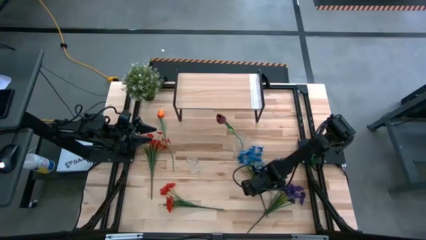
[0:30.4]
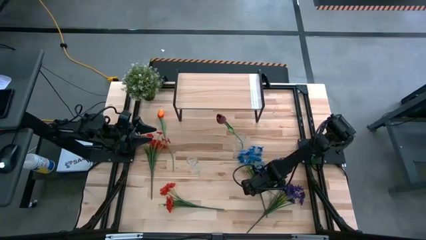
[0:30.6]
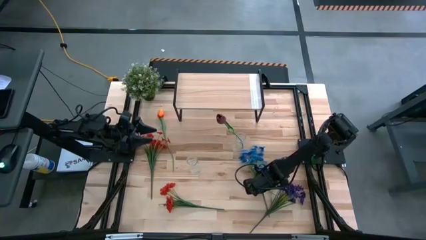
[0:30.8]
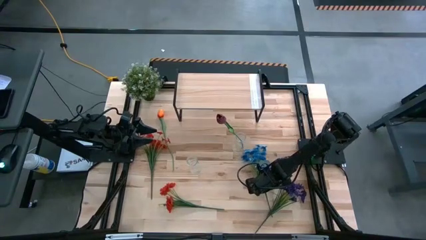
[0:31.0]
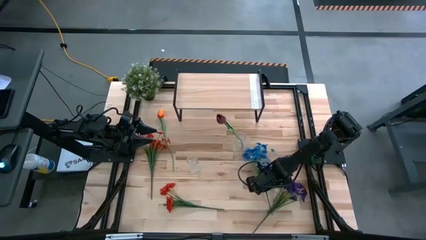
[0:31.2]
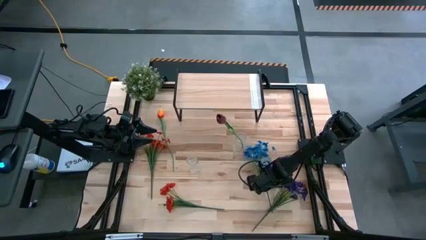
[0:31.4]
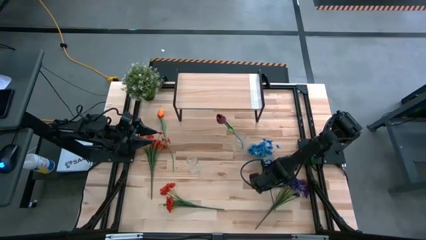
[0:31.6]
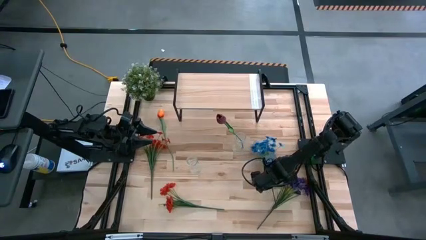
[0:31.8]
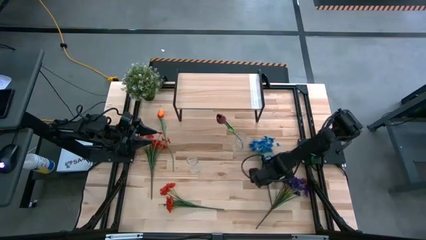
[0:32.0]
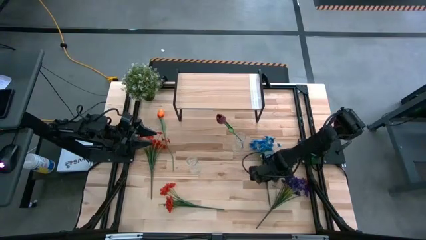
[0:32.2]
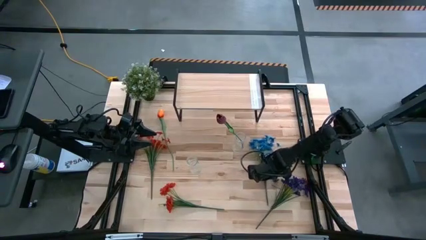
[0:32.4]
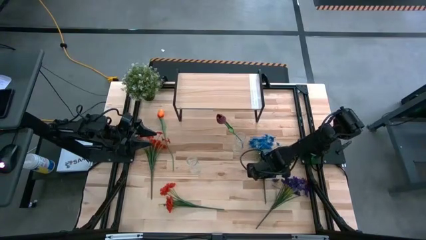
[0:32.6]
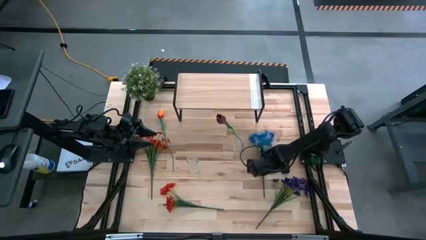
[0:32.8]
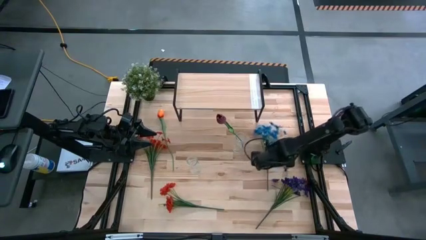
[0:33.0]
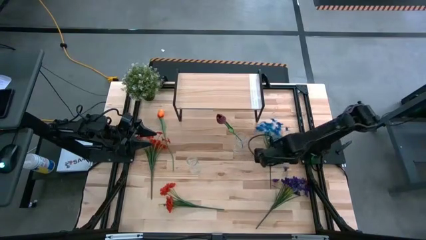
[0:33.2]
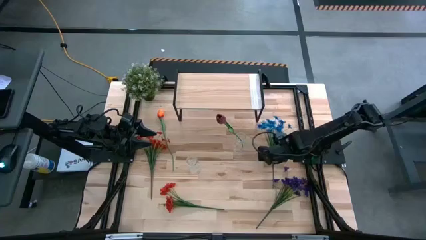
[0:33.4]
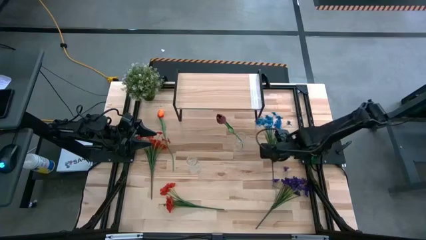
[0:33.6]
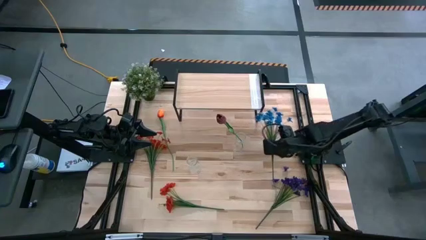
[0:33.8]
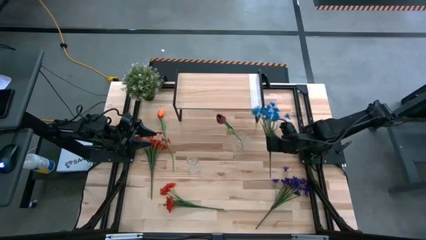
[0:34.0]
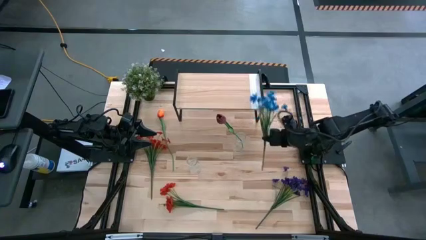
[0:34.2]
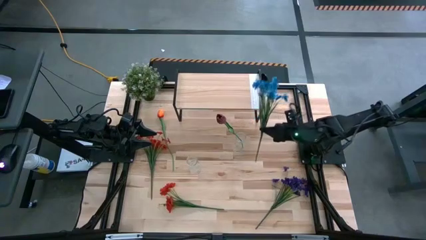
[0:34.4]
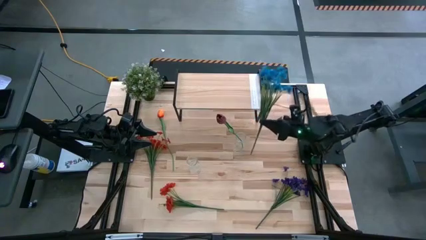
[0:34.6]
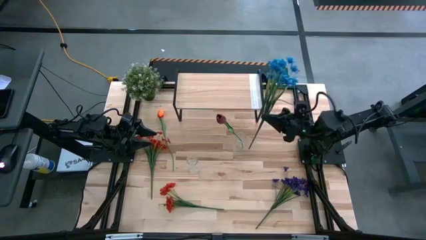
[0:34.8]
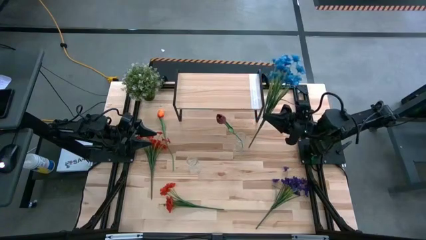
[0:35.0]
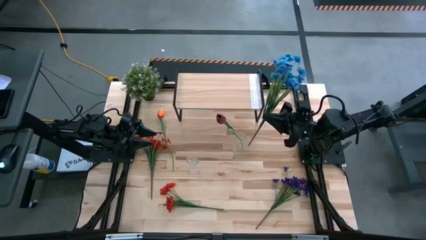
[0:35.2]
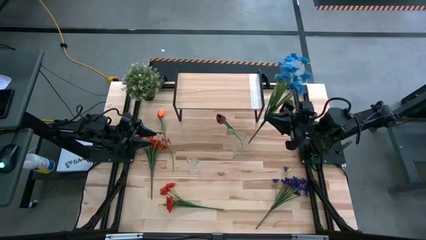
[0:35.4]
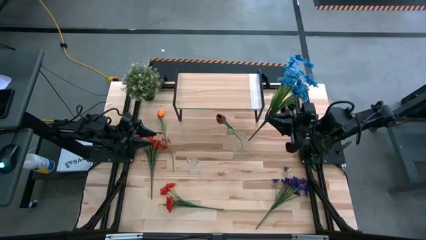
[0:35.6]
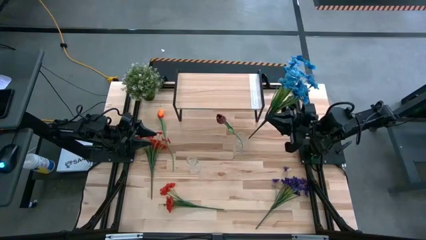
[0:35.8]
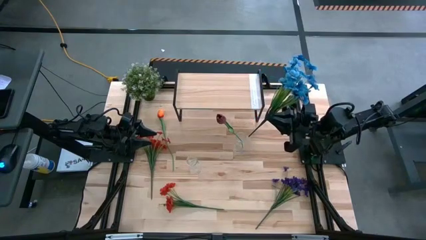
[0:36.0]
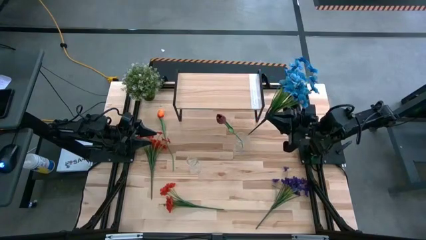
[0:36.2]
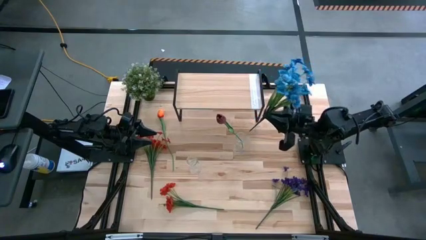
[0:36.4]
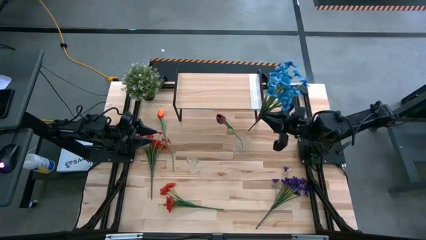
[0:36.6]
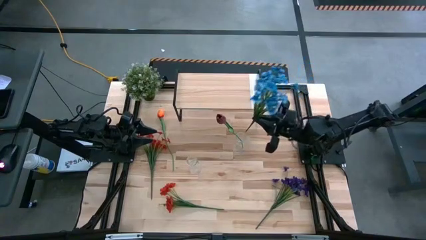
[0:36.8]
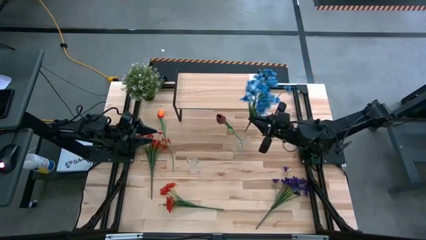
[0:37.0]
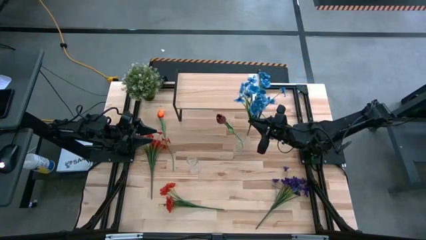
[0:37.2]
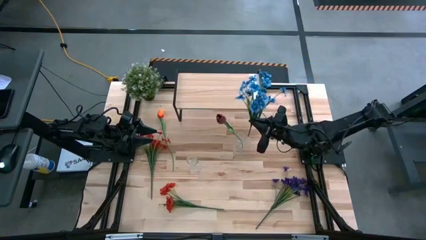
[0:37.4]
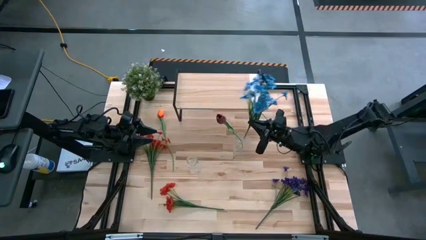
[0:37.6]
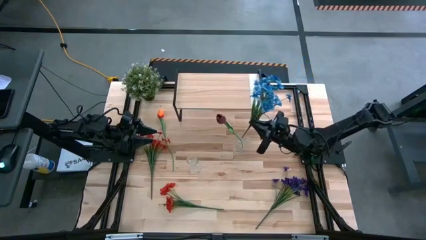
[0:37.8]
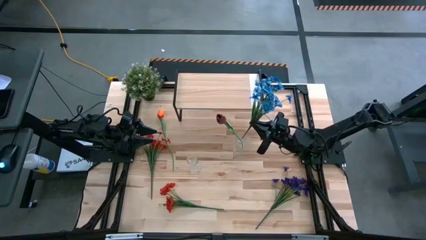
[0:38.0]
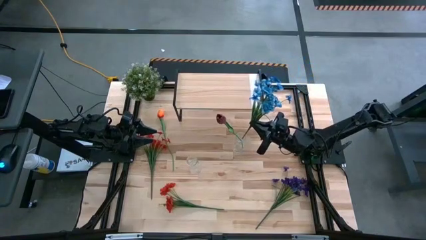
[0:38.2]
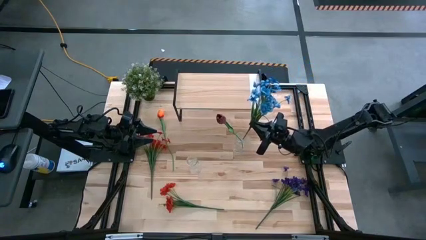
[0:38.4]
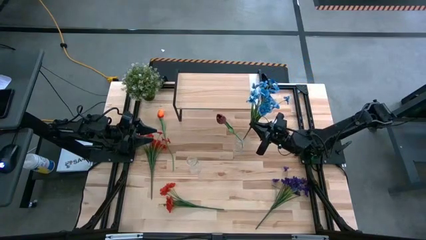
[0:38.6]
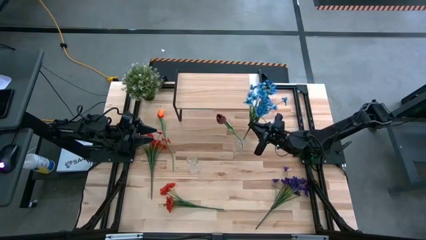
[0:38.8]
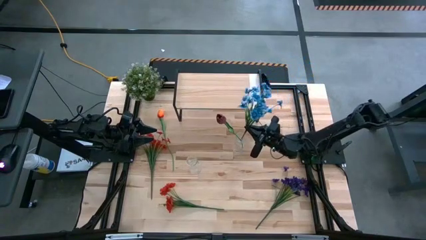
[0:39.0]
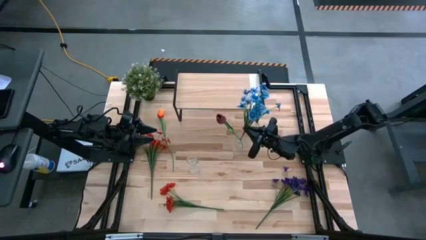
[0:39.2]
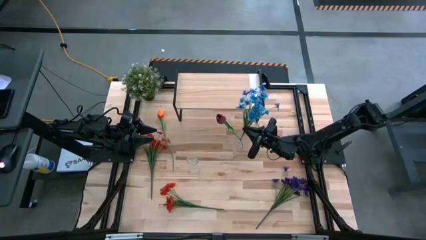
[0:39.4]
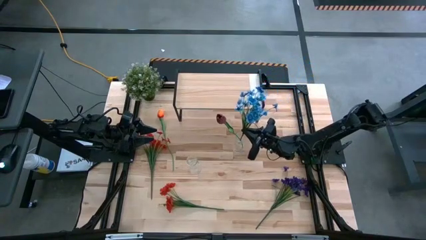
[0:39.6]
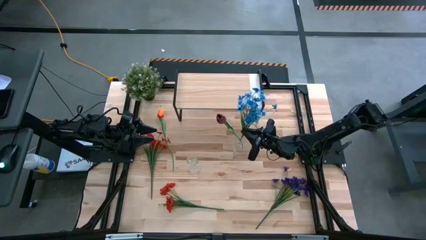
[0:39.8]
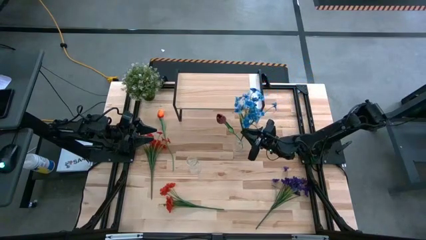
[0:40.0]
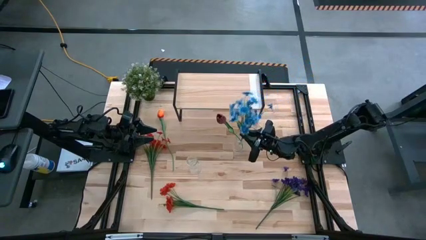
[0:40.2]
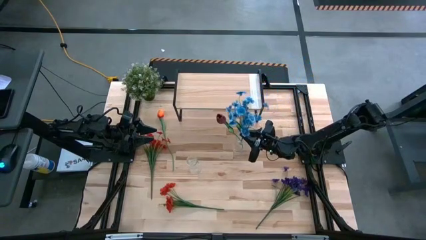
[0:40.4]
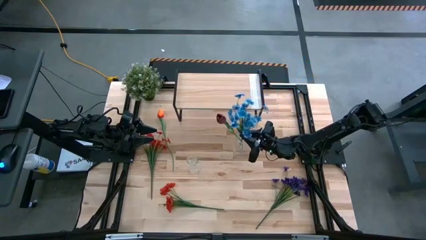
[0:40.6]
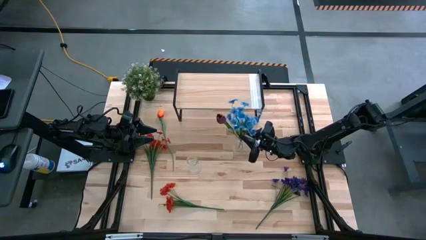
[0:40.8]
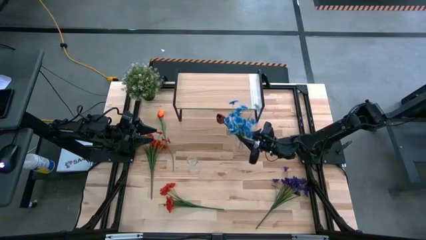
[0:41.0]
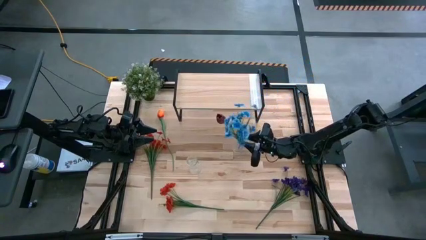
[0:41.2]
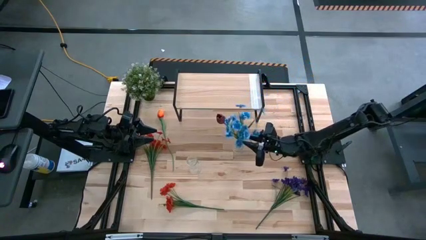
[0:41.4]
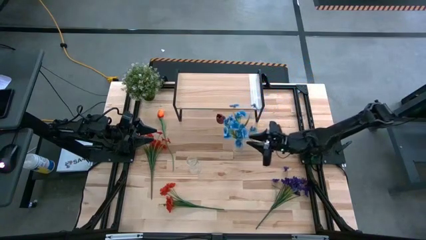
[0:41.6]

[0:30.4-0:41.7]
Task: Pick and place flowers into a vace then onto a shelf
Put the blue flower into the right transparent vase

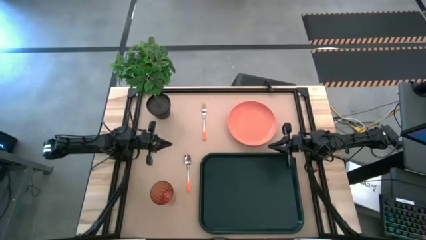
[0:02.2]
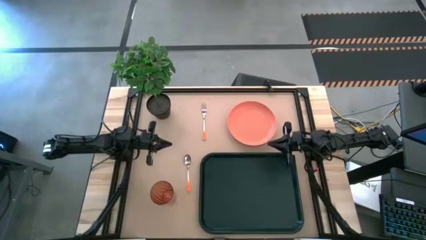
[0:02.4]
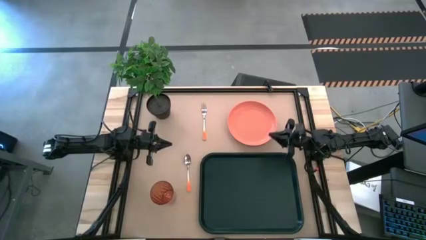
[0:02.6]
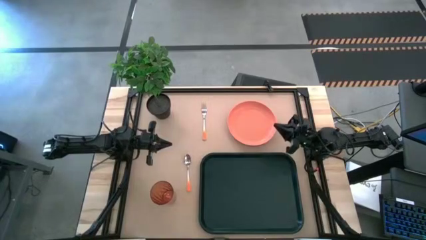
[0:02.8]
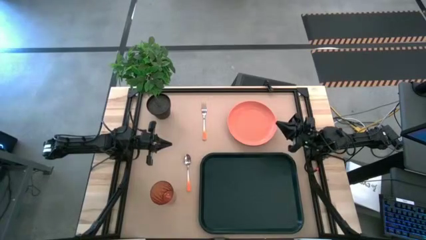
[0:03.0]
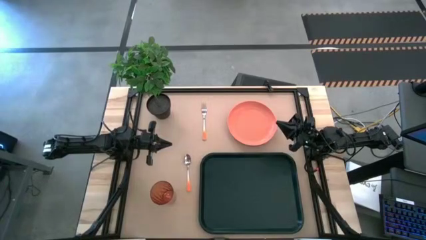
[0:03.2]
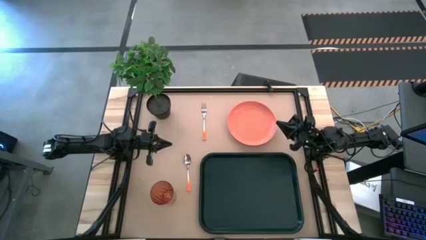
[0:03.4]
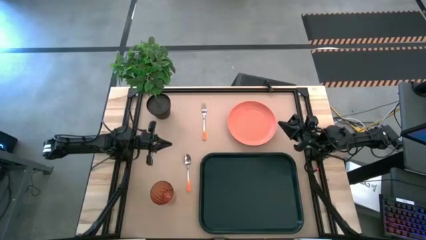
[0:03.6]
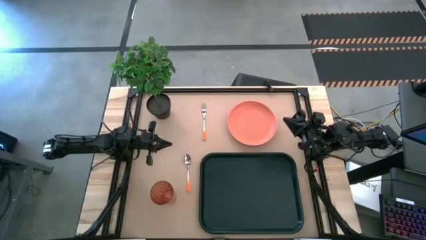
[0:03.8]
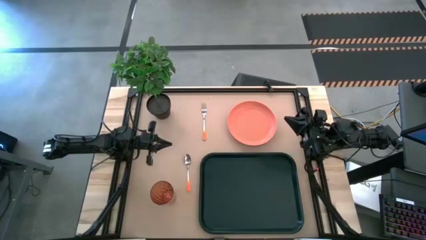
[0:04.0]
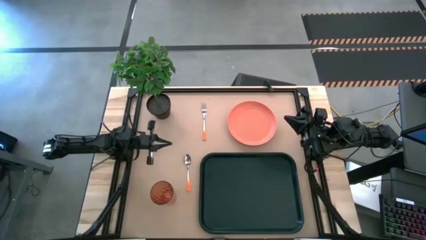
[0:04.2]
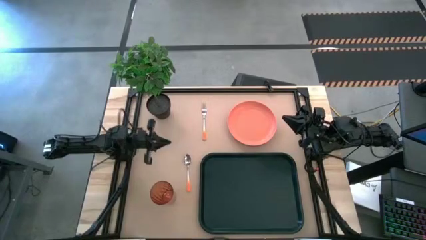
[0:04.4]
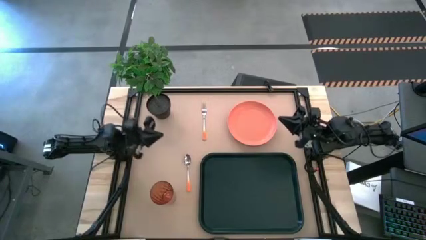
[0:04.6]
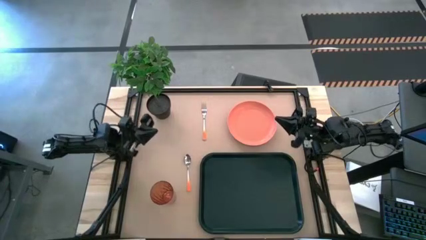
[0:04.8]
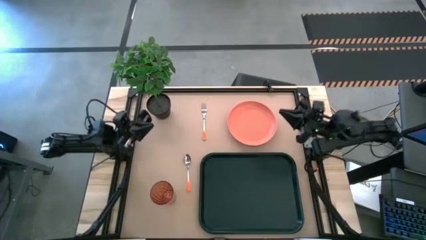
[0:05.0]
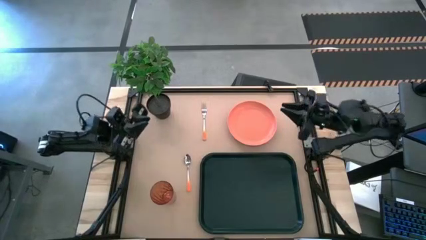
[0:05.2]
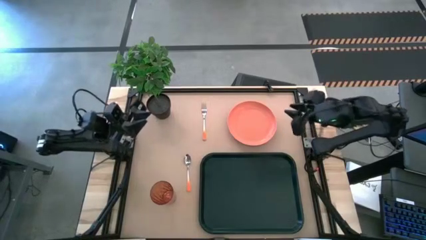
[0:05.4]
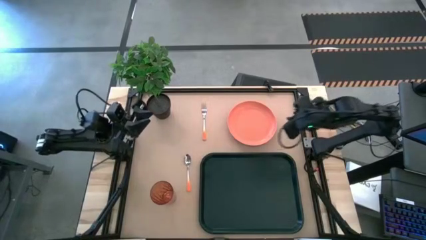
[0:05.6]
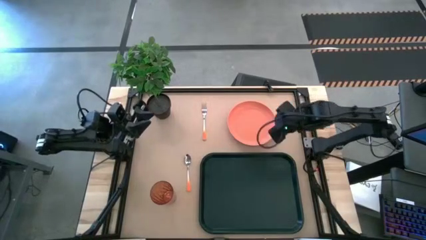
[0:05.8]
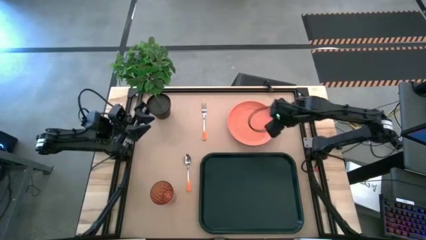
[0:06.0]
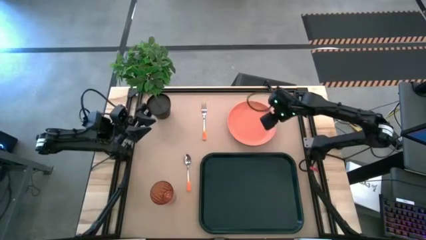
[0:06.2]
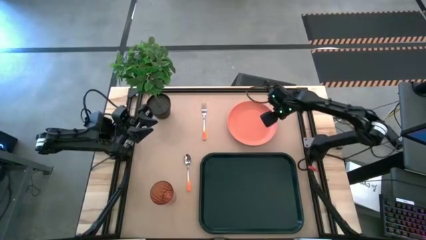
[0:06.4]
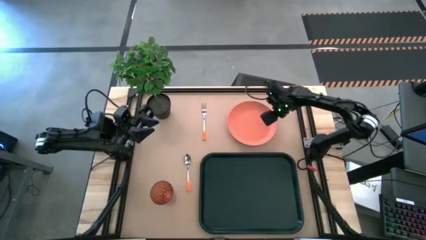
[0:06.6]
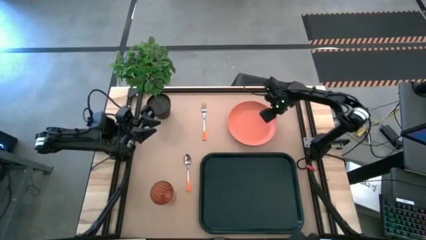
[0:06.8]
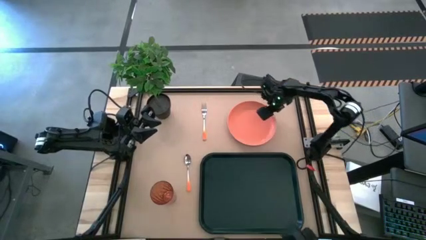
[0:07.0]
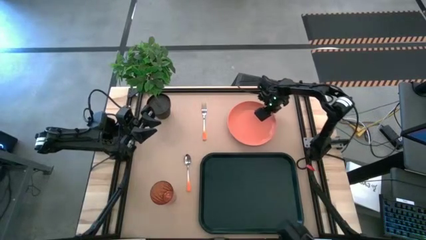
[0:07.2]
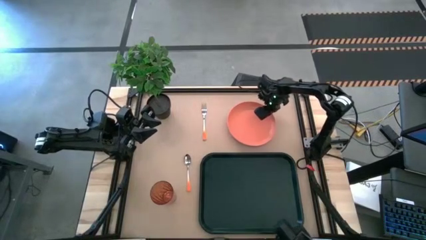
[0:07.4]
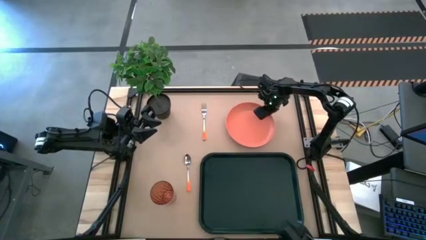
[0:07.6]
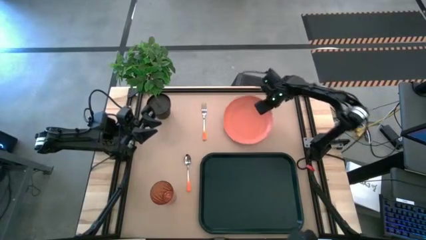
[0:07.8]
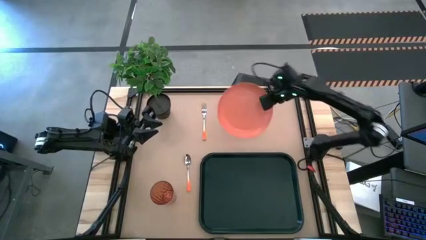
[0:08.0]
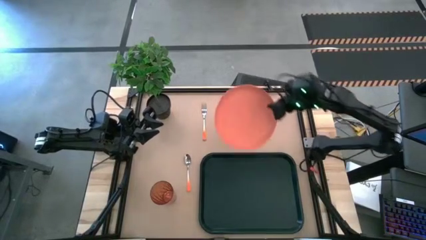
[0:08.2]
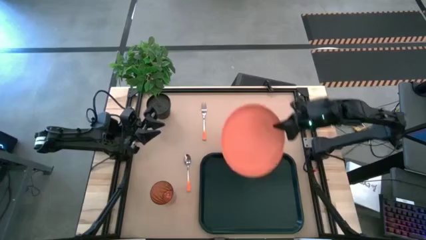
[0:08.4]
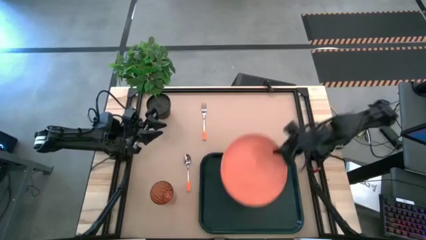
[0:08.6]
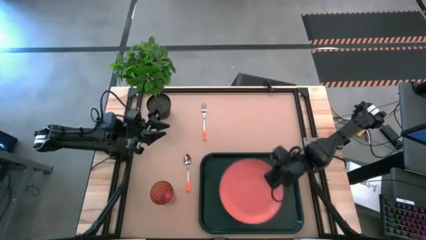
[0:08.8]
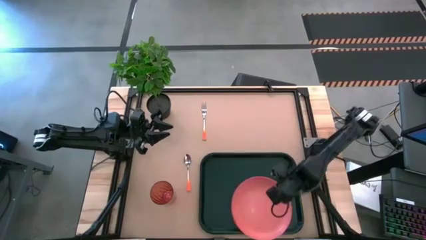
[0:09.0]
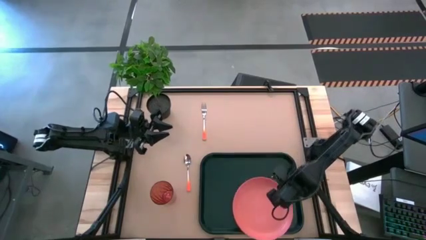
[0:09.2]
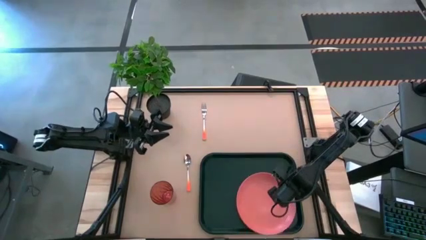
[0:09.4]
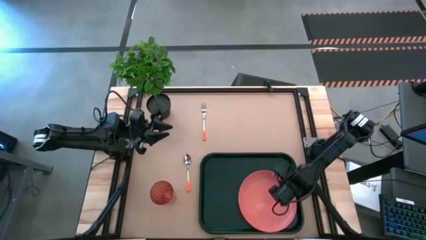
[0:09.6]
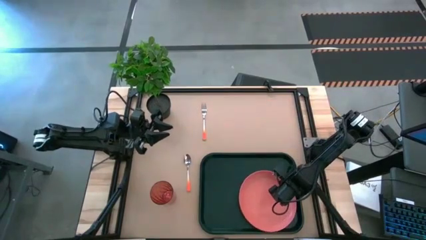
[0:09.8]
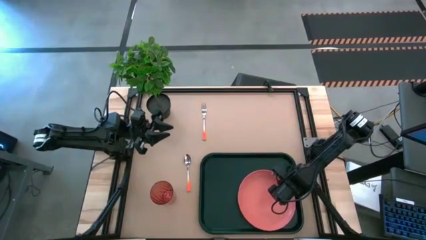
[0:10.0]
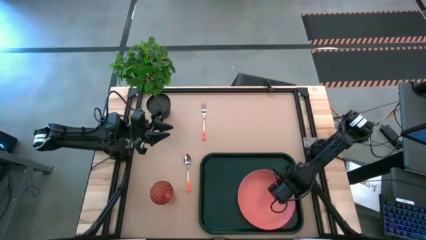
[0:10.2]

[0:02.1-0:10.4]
Task: Pick and place plate/cup/fork/spoon on tray
Put the pink plate on the black tray
